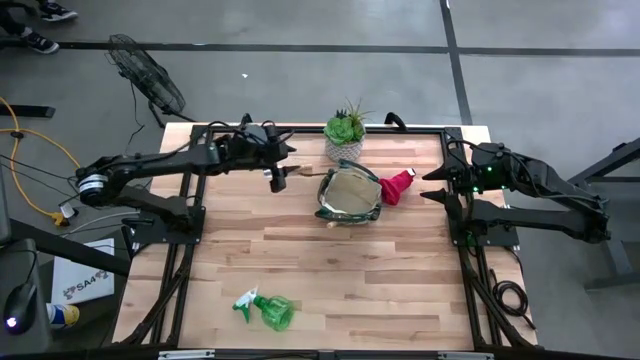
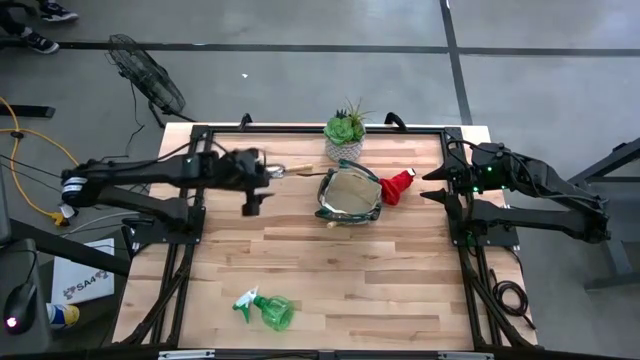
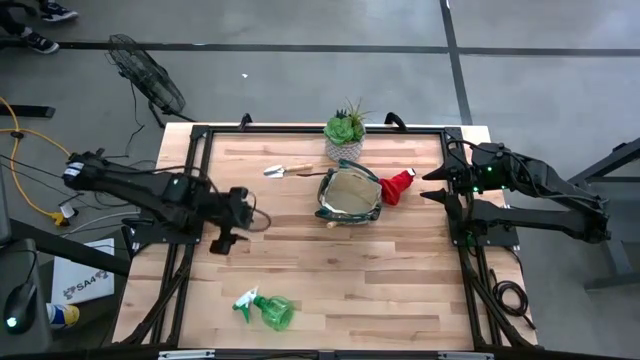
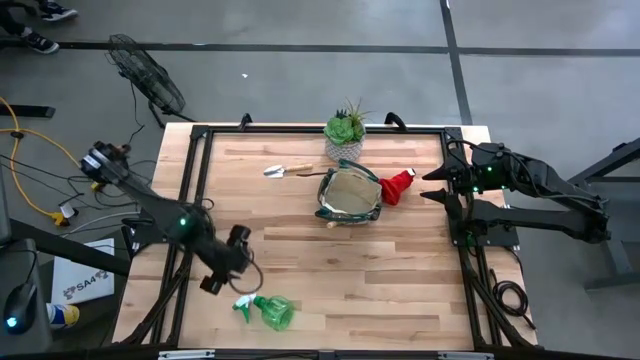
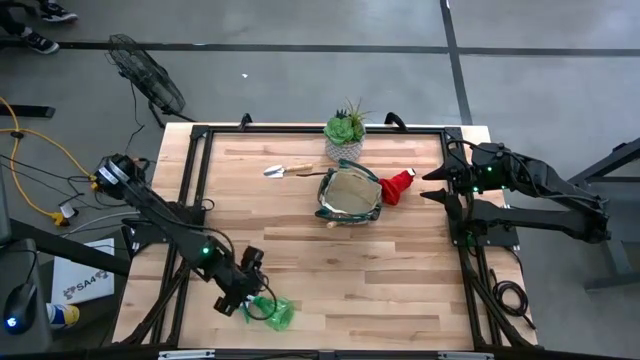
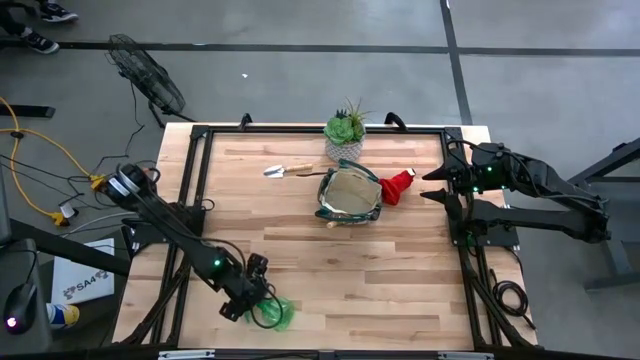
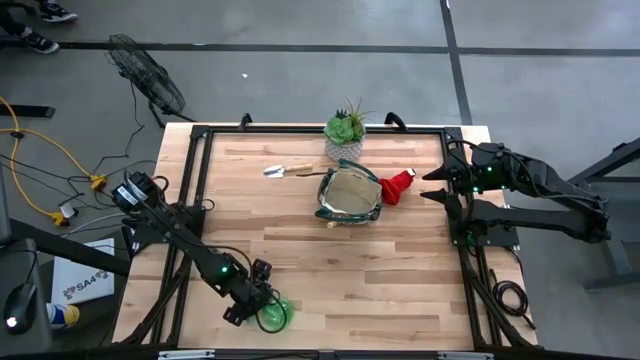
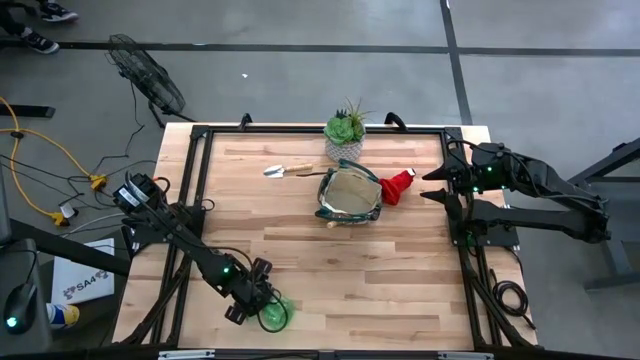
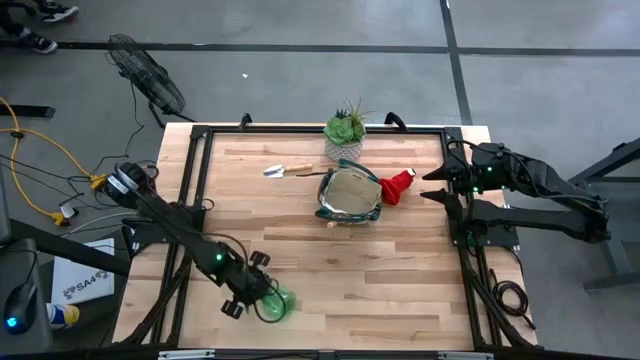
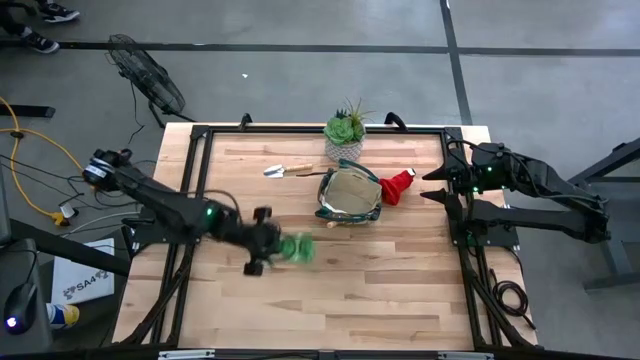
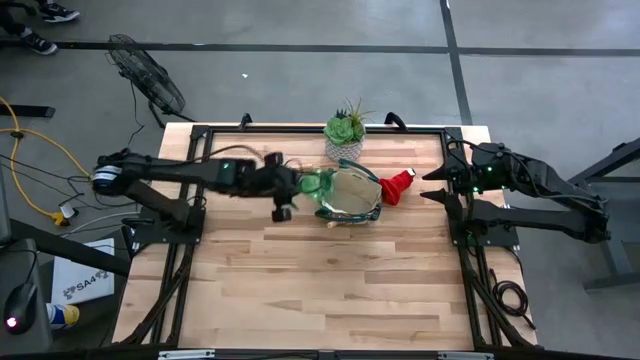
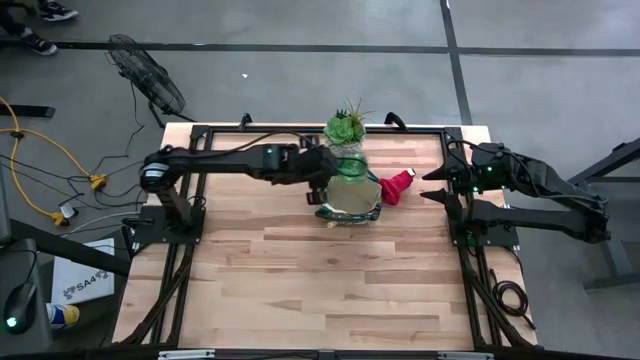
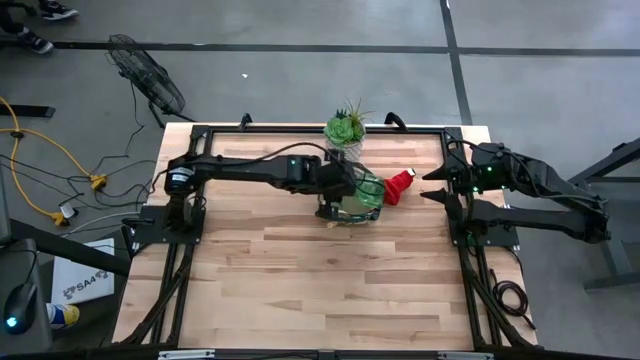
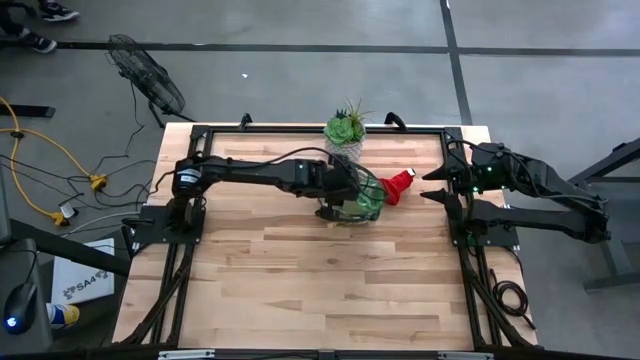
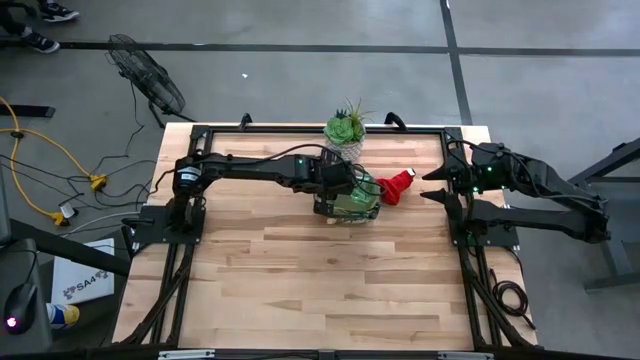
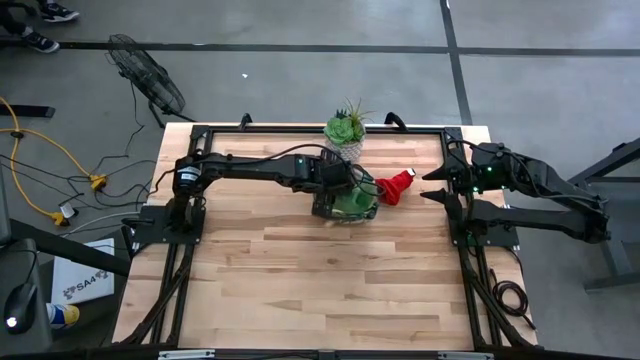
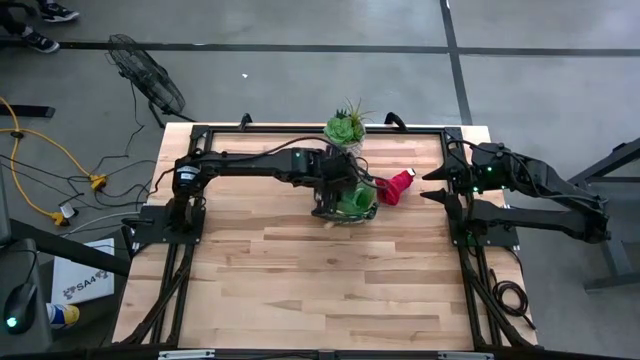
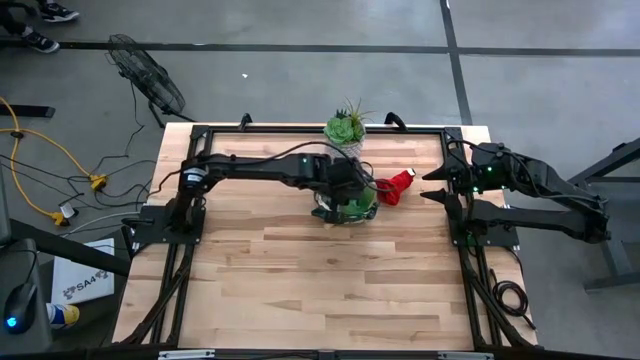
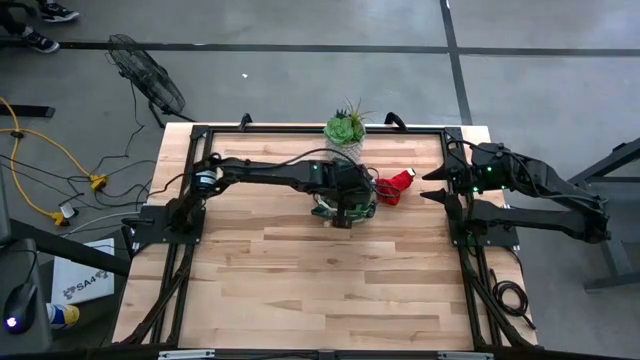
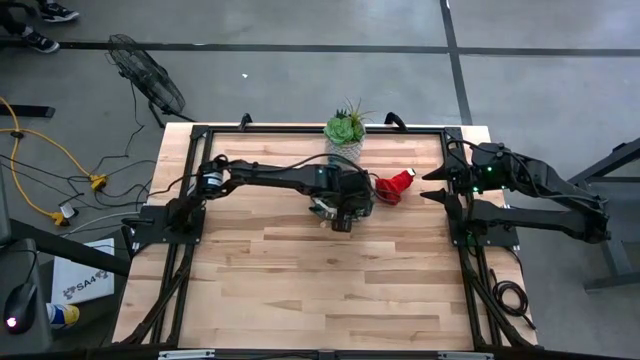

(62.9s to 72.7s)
Task: Pick & Place Garden tools in Gardening bag
Put the green spray bottle into the brown gardening bag

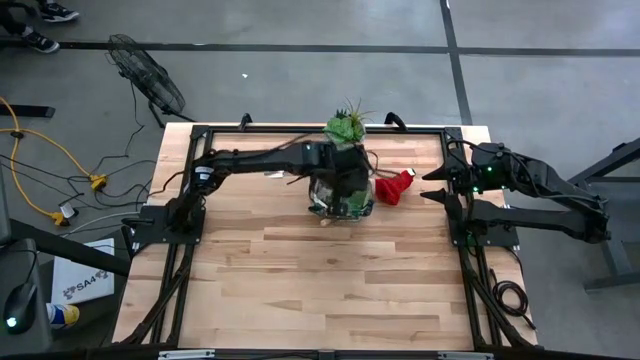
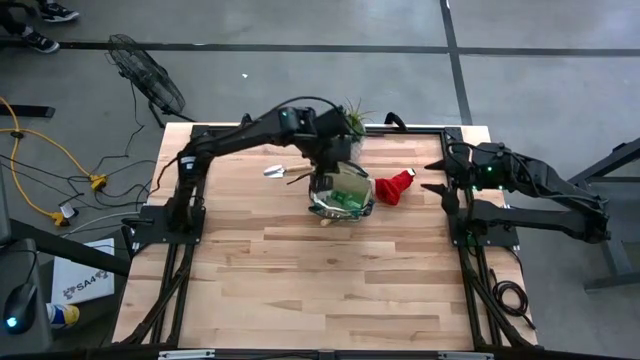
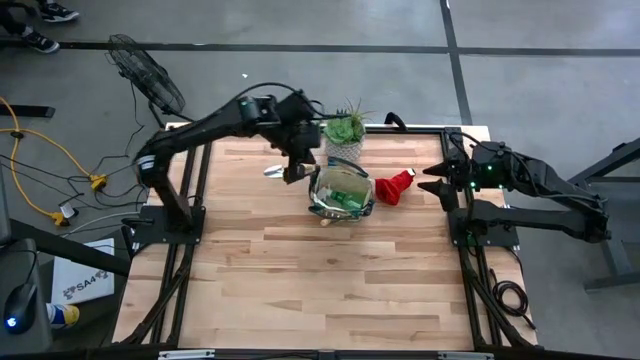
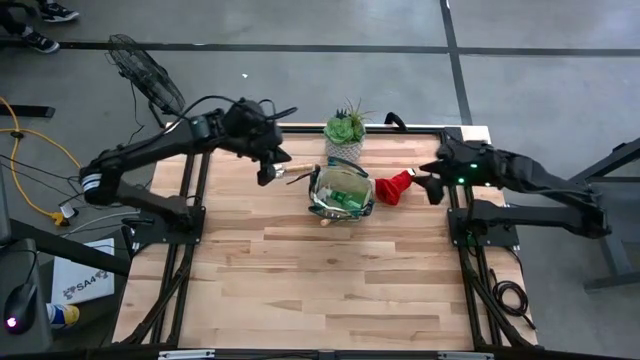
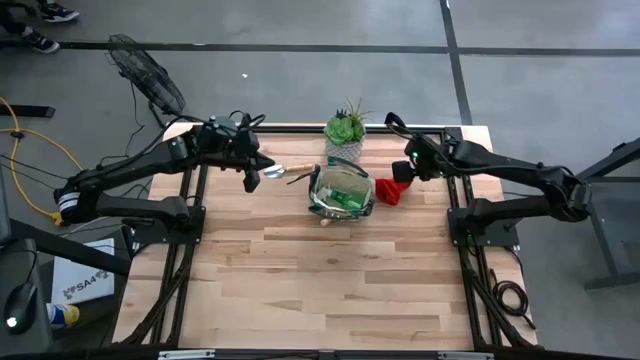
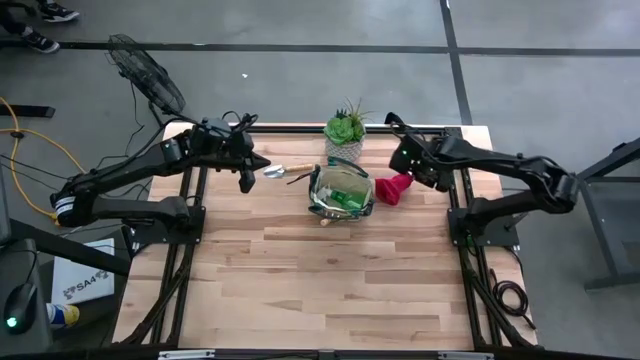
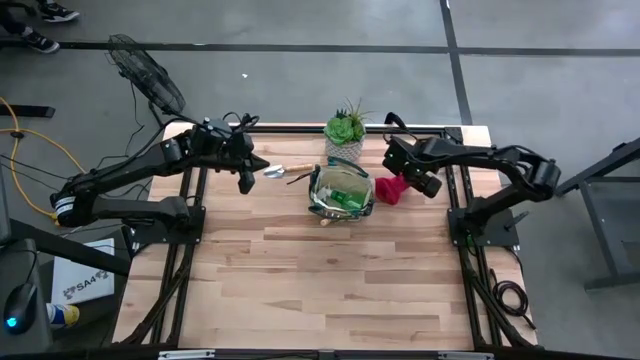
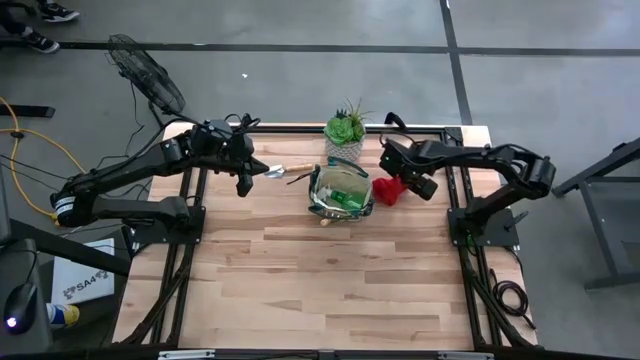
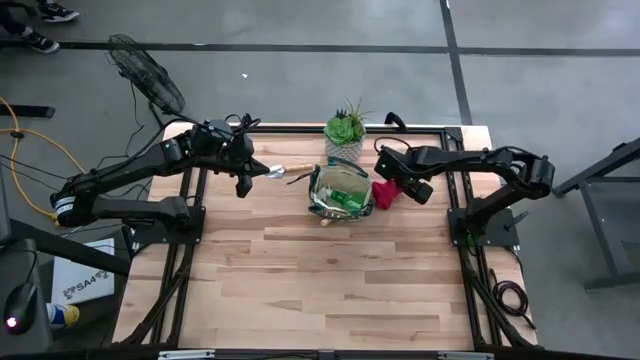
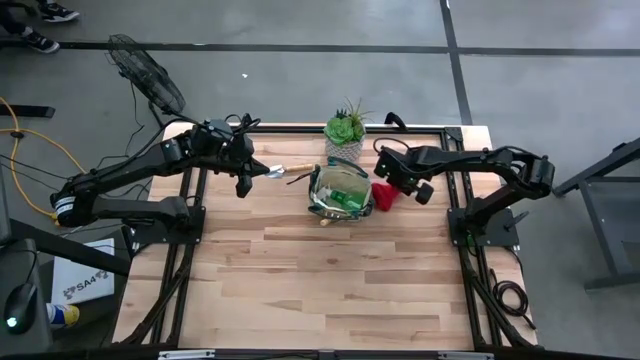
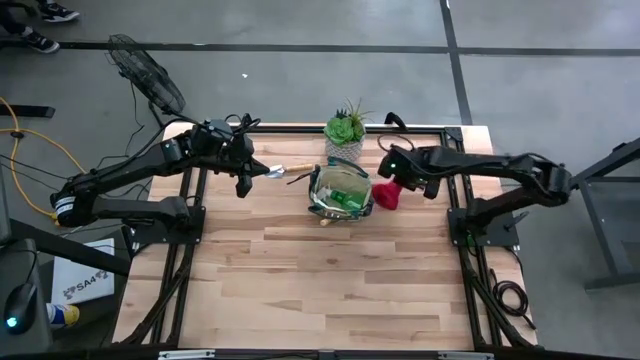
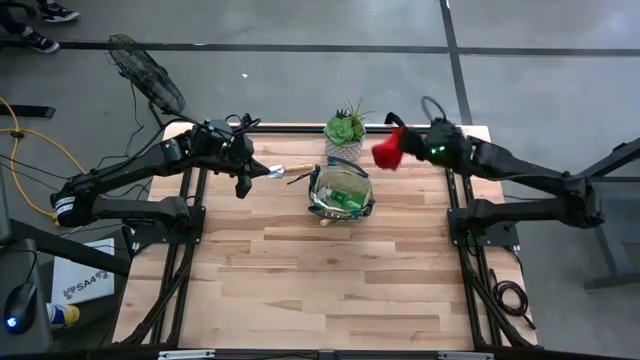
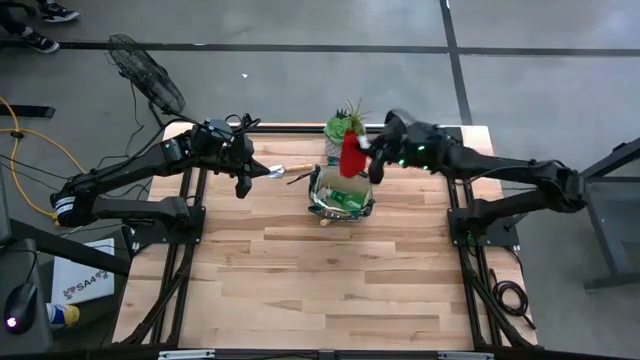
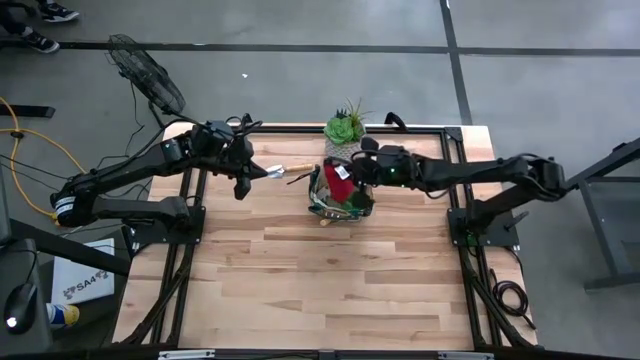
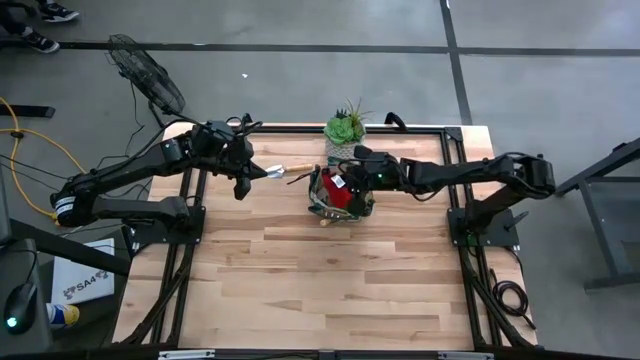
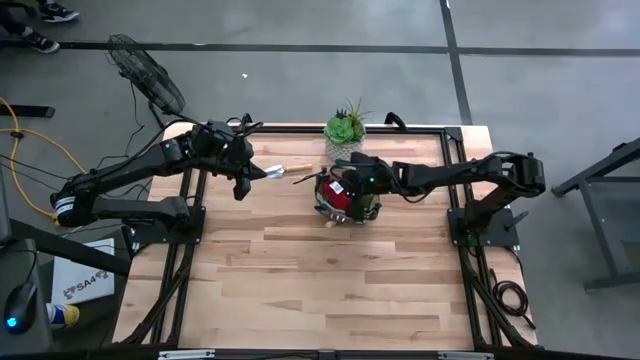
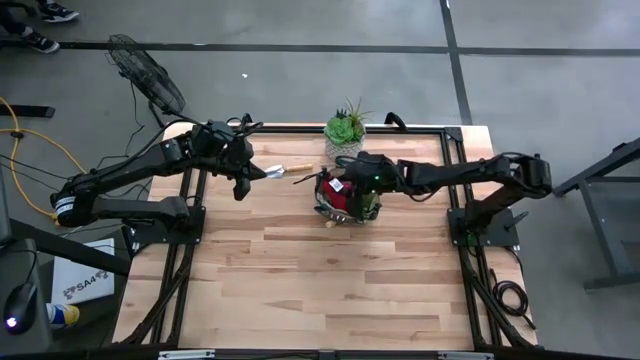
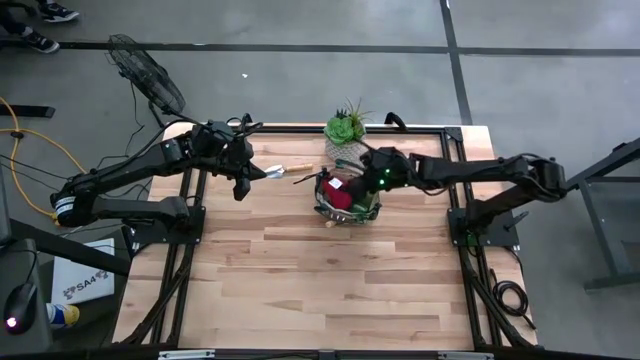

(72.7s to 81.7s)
Put the red gloves into the brown gardening bag

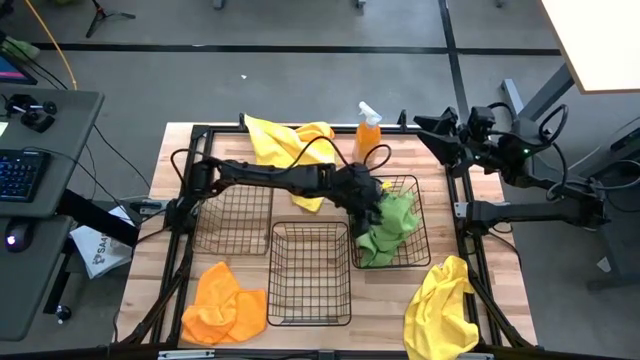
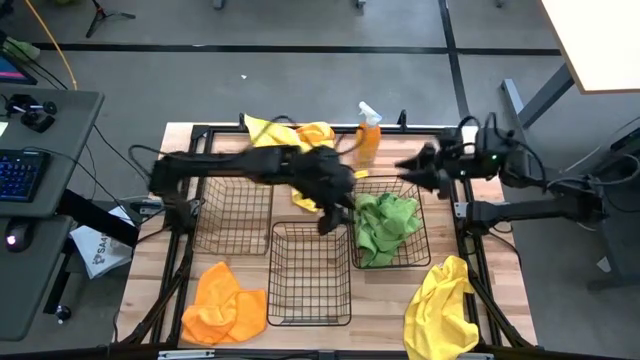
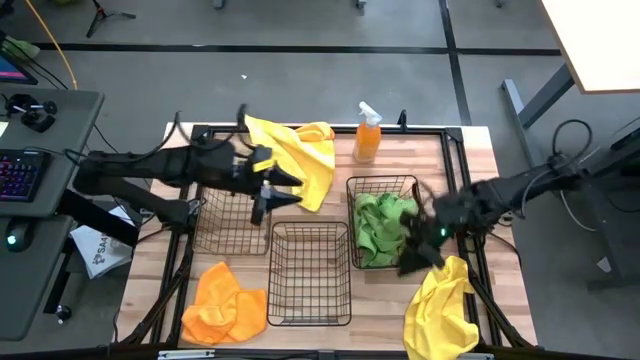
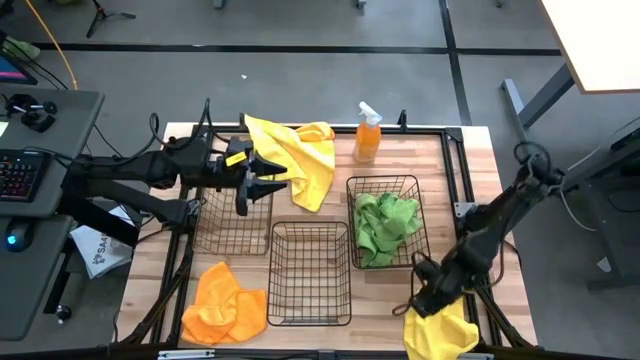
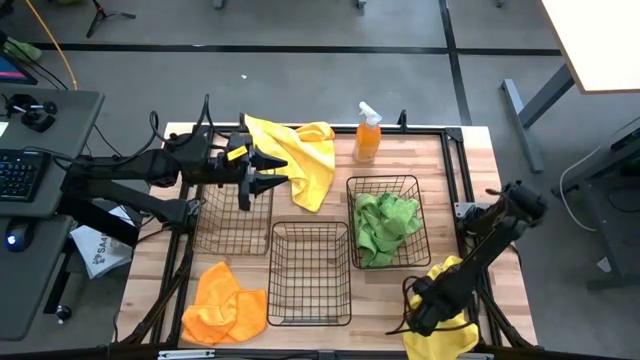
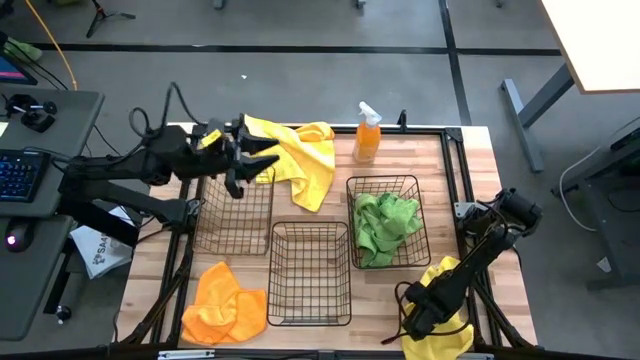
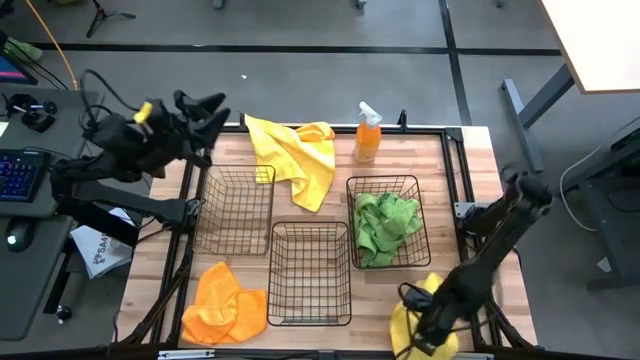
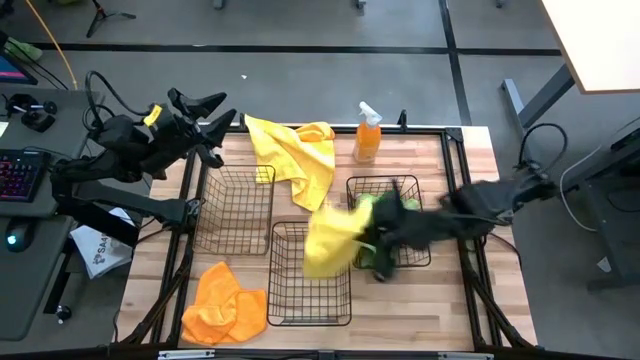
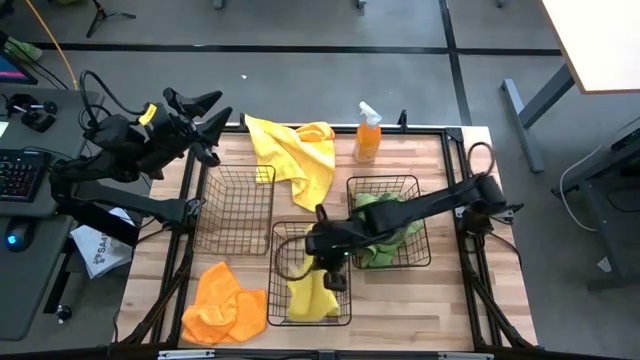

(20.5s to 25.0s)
Task: Sort microfiber towel by color & place in baskets
Put the bottom yellow microfiber cloth into the center basket
